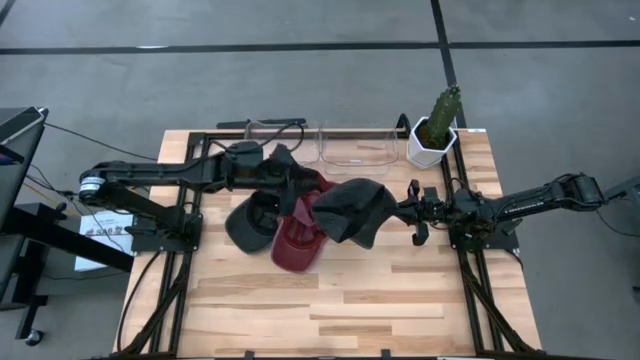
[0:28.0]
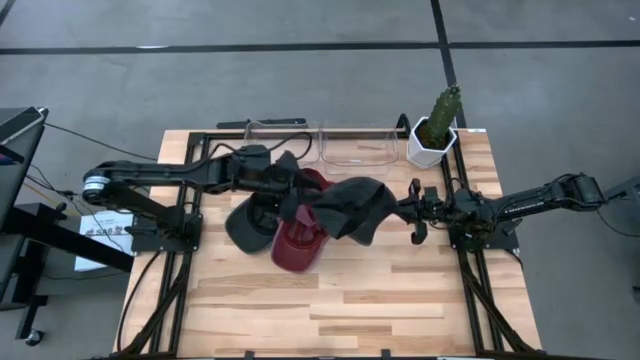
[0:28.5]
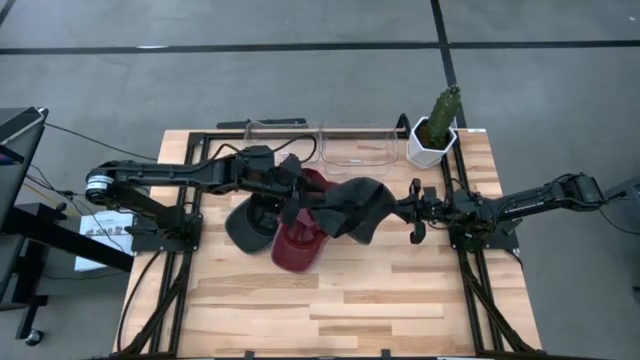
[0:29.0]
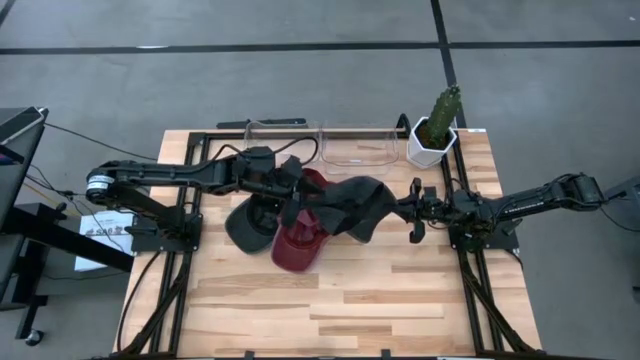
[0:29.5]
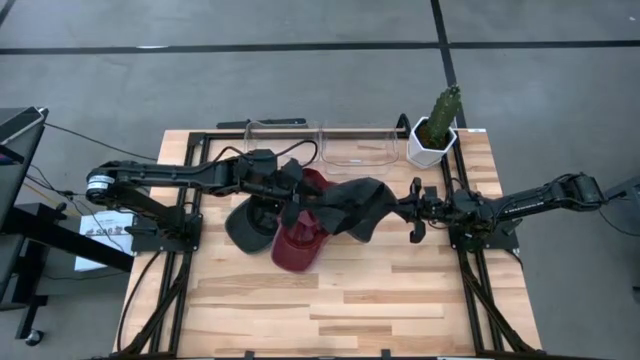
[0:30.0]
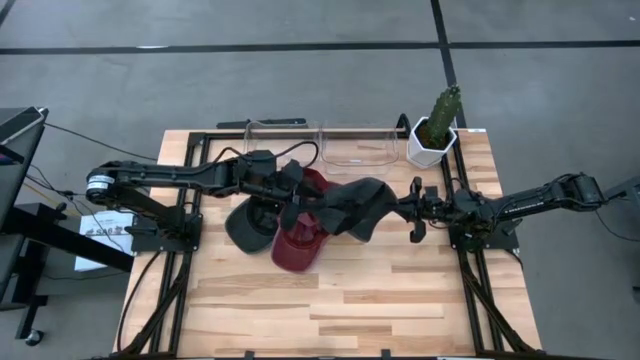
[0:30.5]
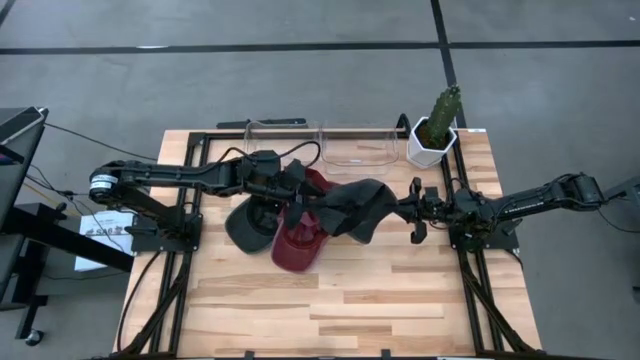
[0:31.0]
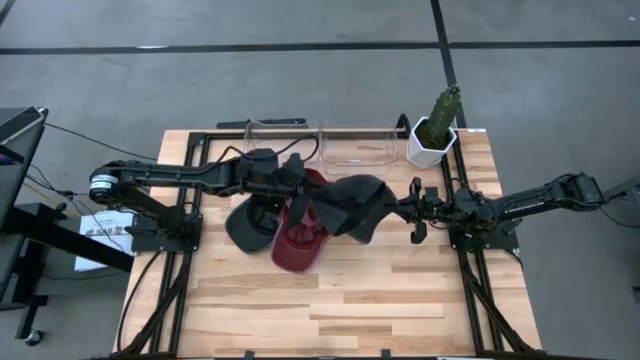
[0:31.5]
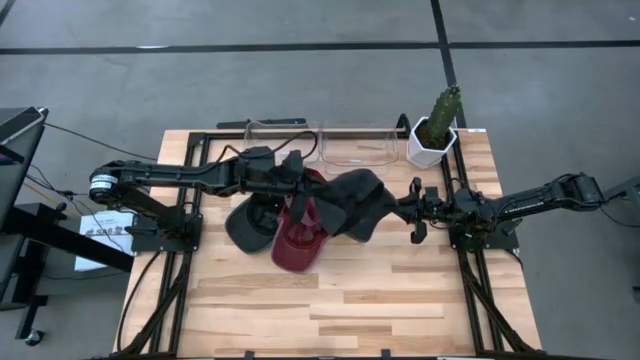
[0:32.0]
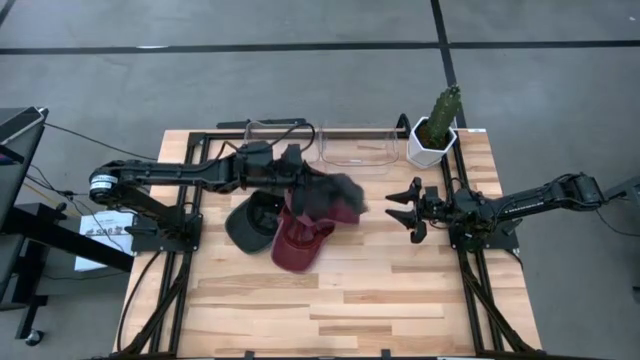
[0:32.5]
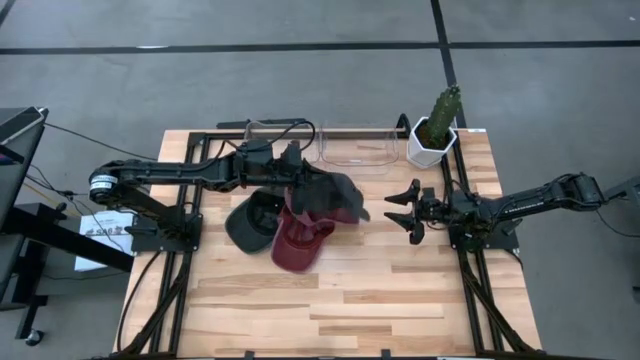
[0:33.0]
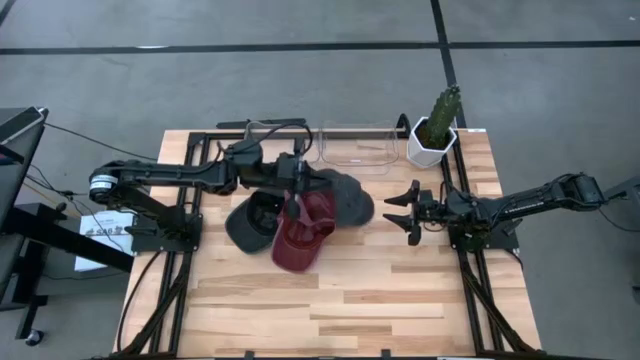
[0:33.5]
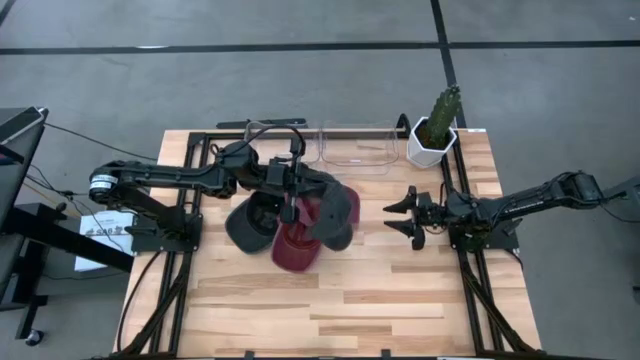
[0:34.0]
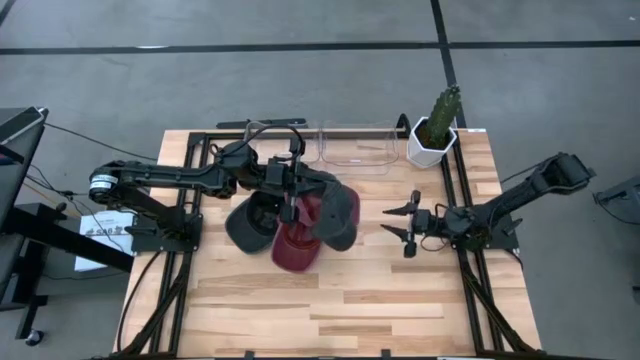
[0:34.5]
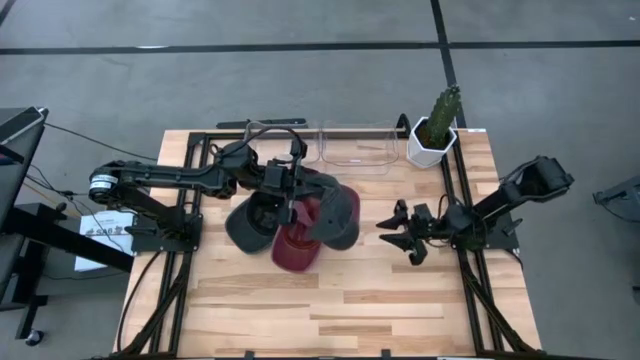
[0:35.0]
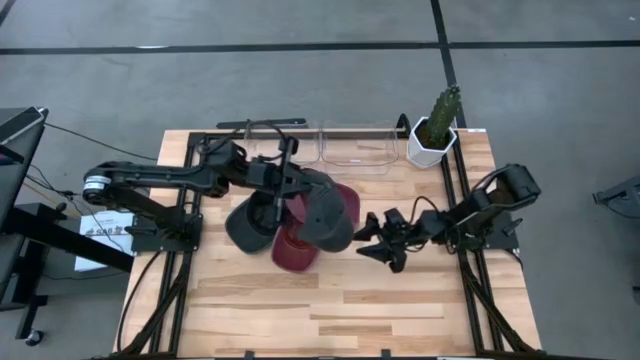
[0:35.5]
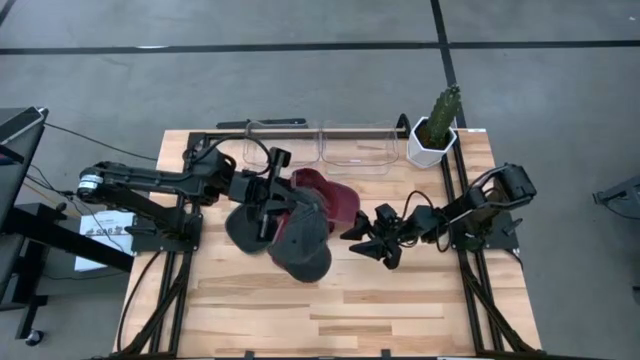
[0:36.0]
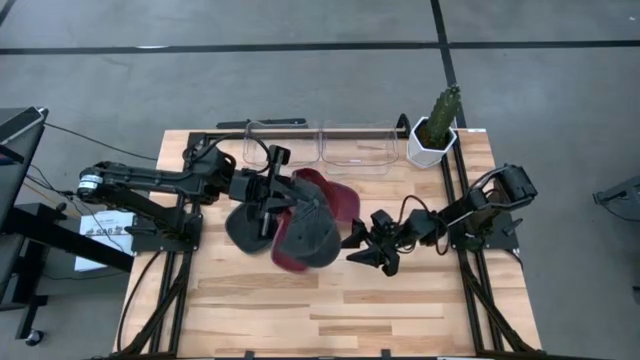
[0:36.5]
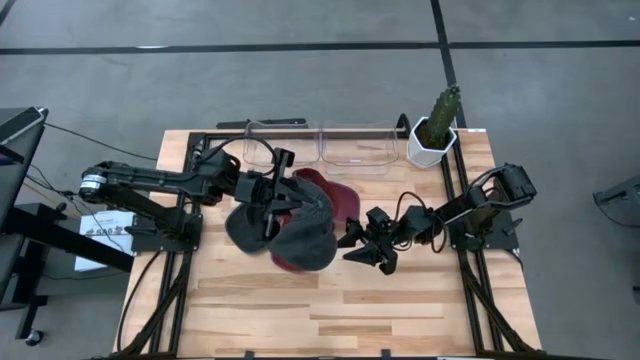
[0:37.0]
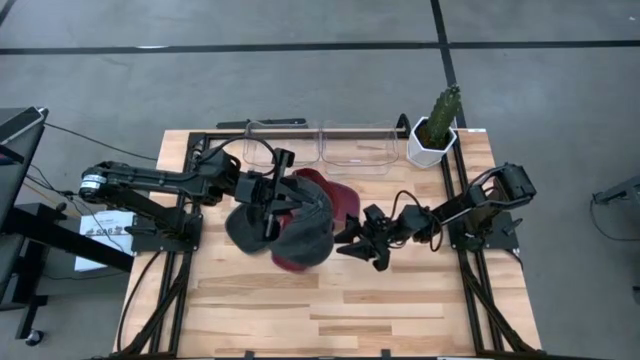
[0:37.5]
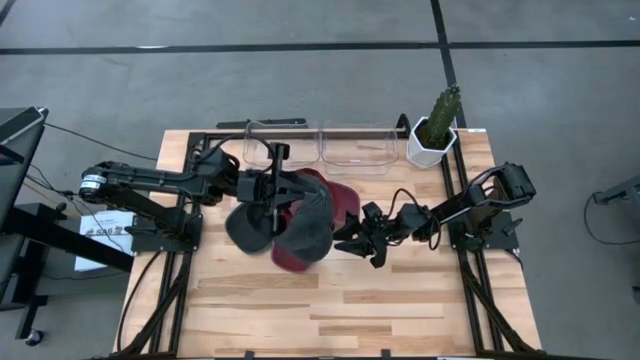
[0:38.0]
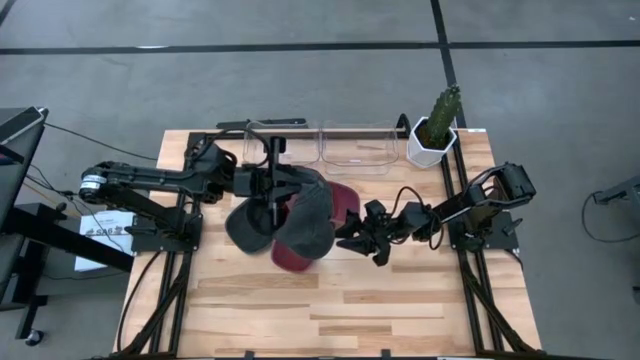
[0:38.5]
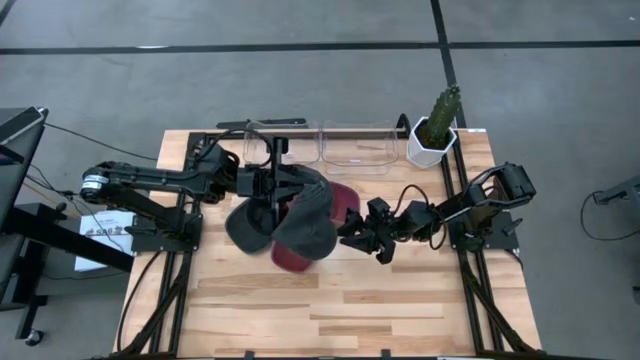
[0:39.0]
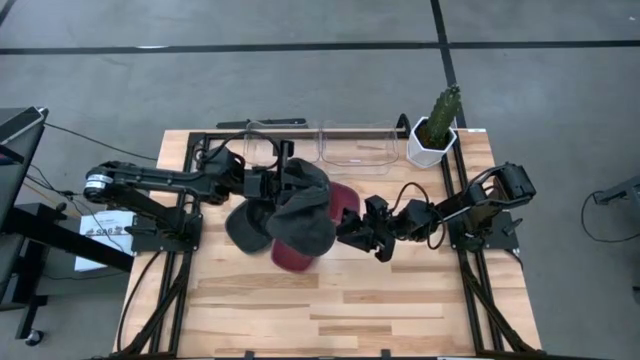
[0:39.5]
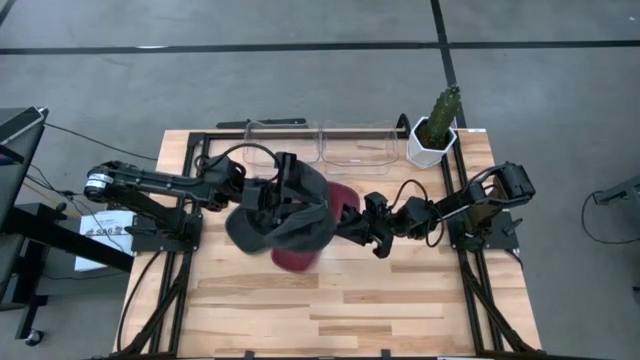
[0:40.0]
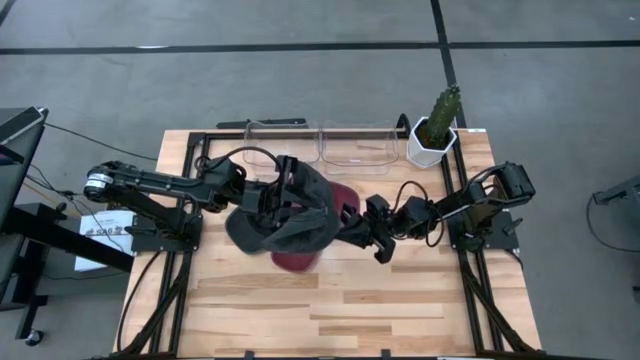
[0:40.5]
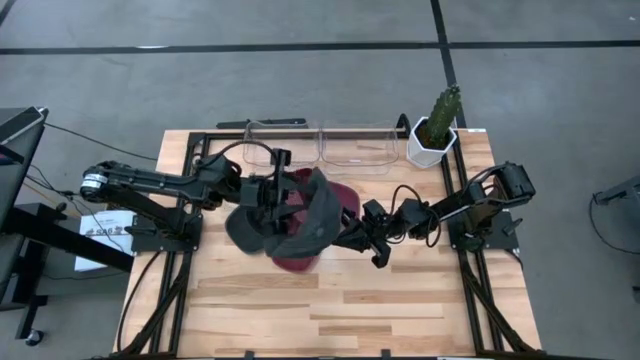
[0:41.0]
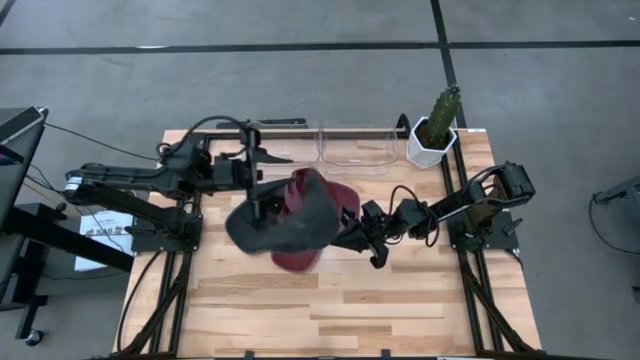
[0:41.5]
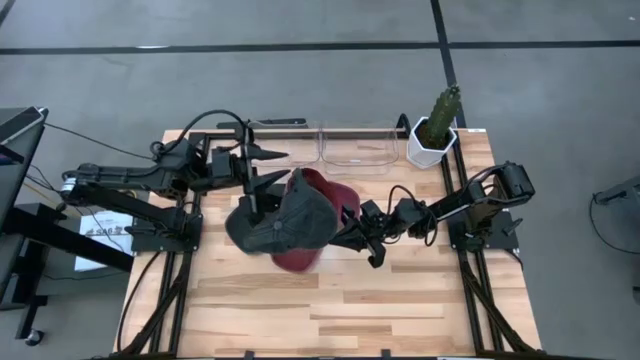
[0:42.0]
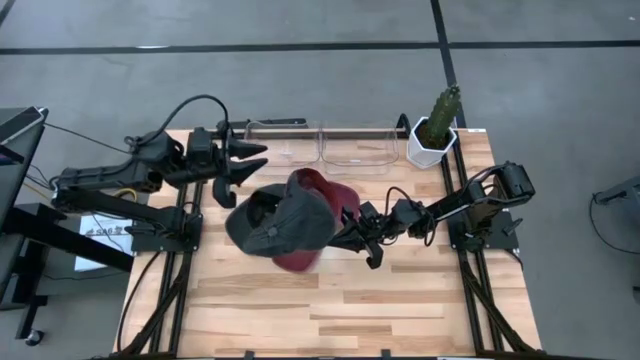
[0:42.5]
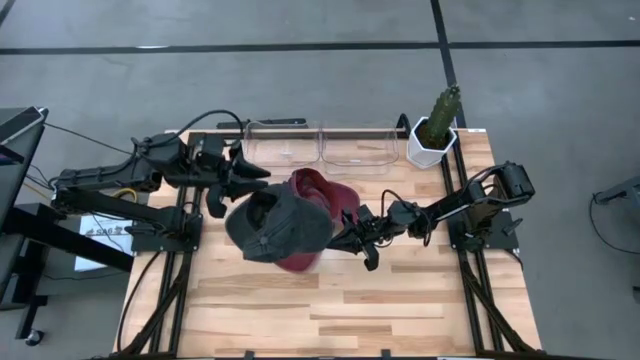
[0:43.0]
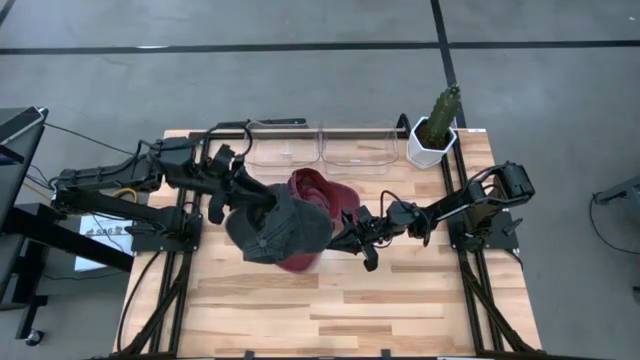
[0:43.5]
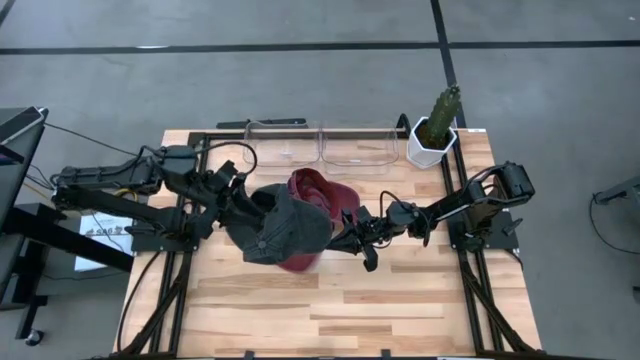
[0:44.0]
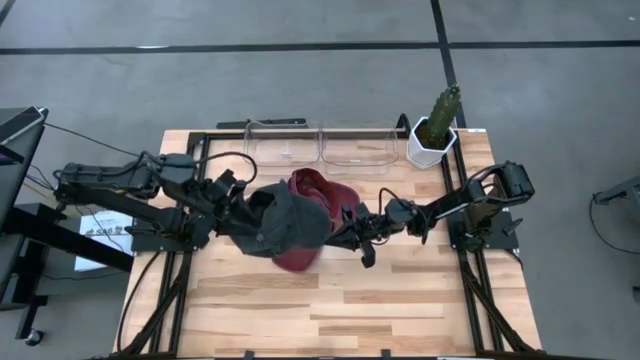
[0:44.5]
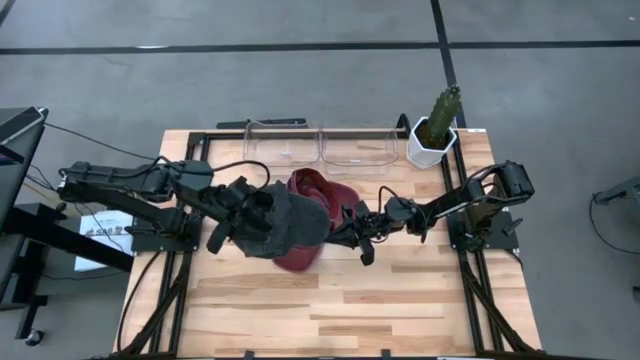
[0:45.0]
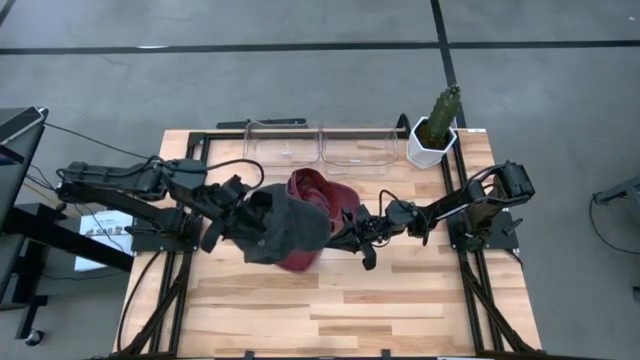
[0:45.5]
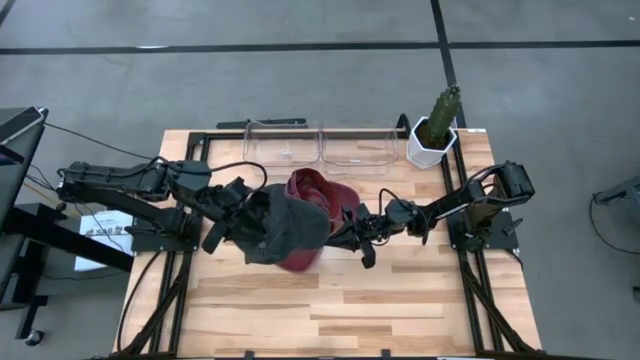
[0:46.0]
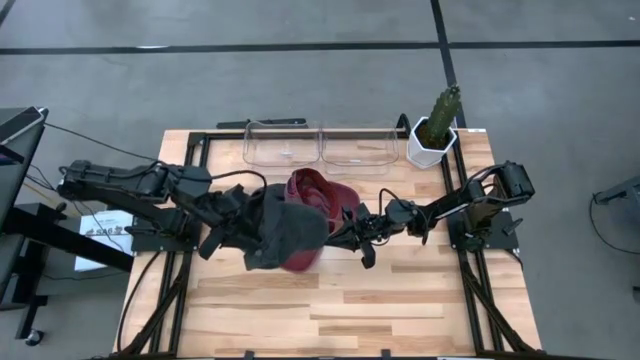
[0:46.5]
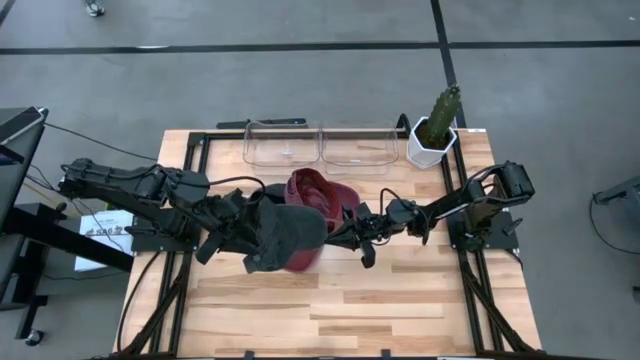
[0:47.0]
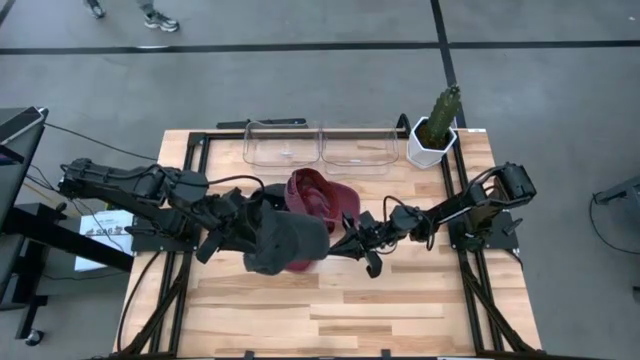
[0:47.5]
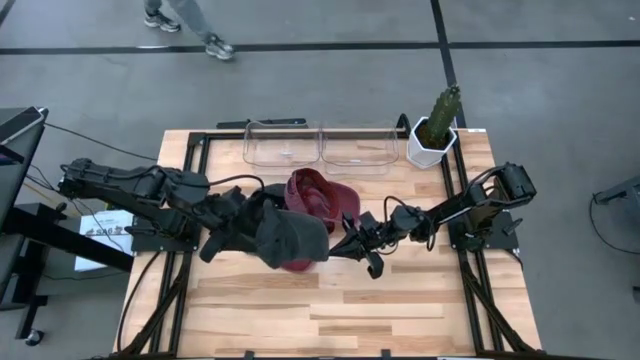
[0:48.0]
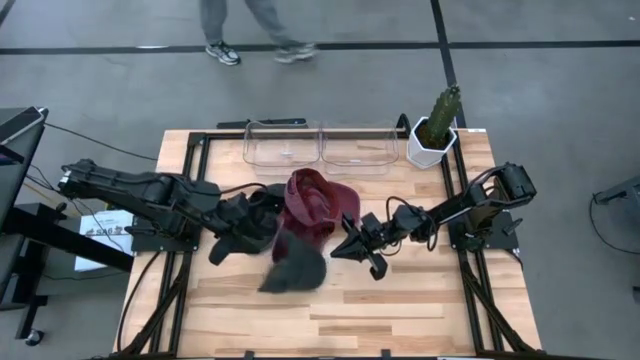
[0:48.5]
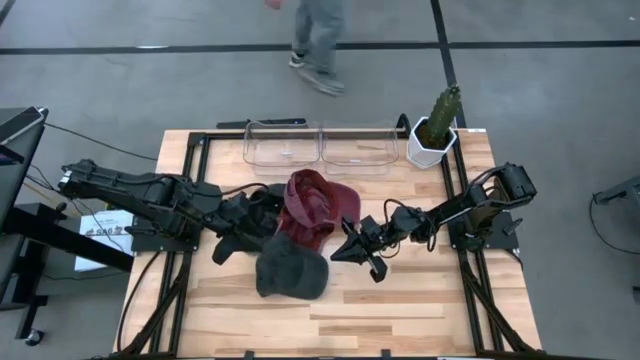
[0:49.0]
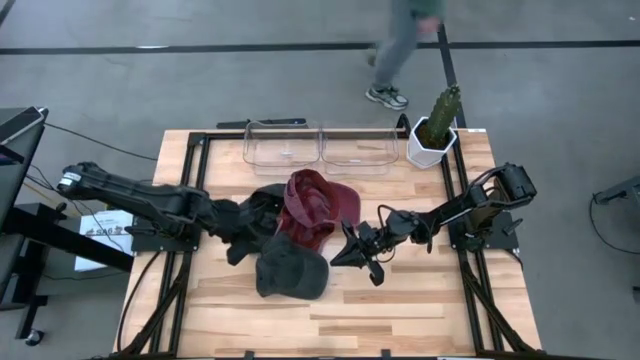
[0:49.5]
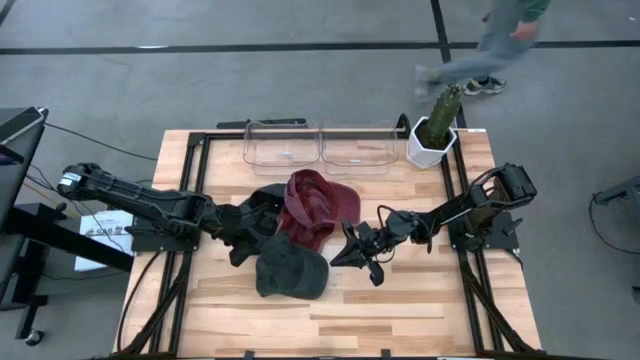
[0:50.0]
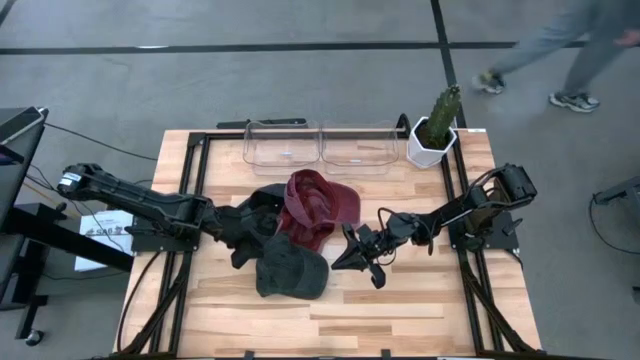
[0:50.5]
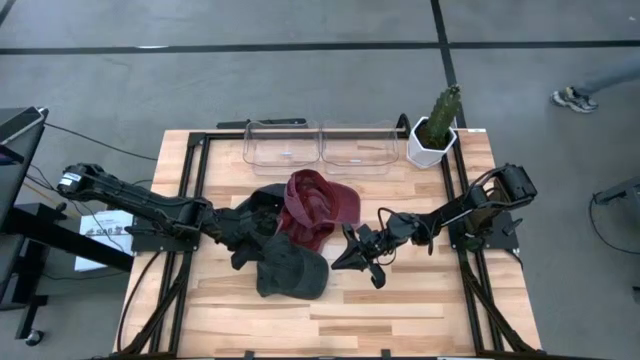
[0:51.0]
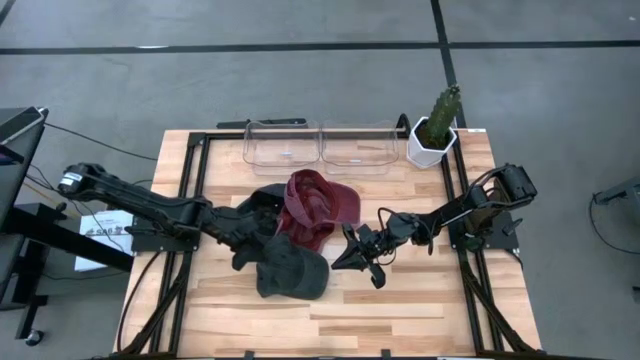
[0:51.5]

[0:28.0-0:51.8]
Task: Pick & Place hat
Put the right black cap into the left transparent bin
